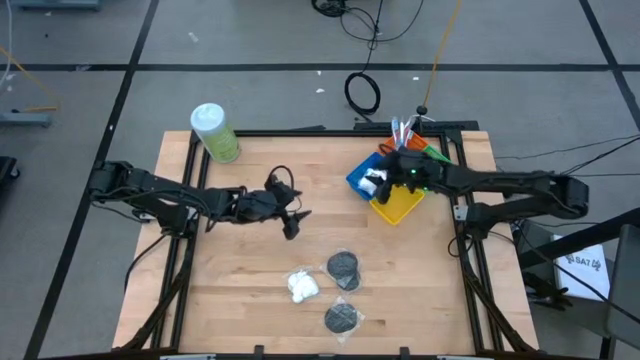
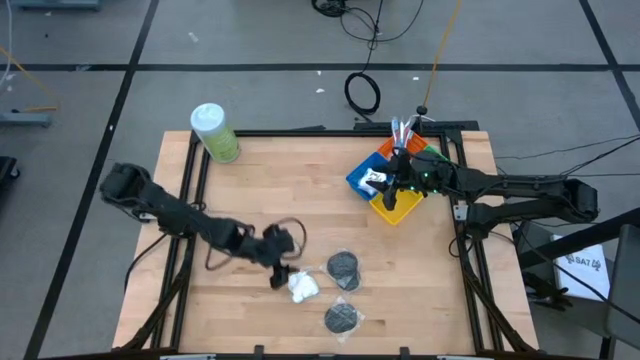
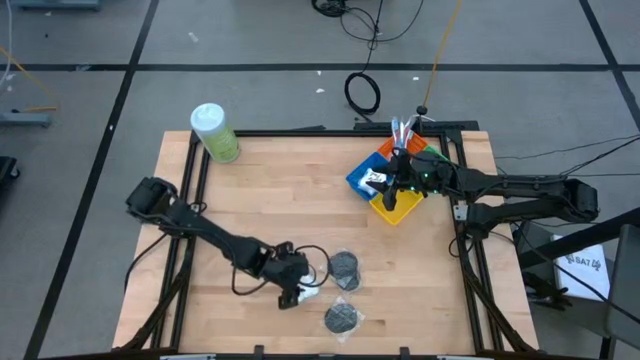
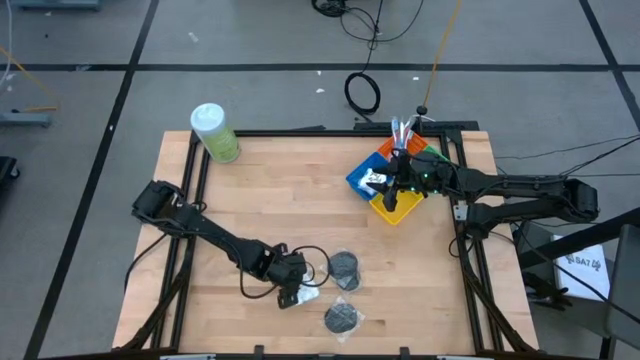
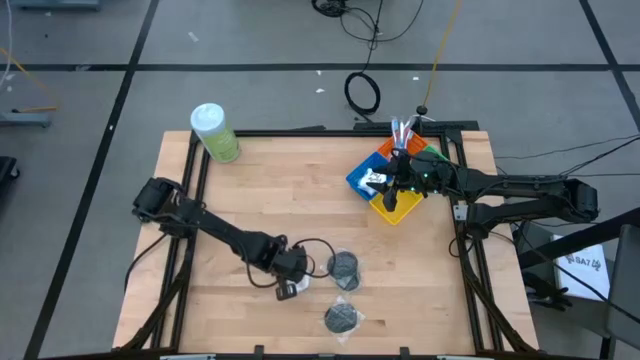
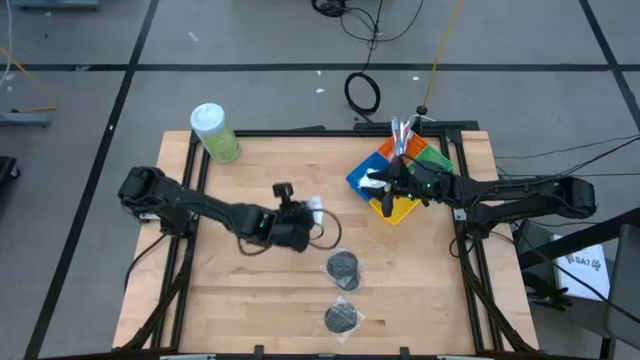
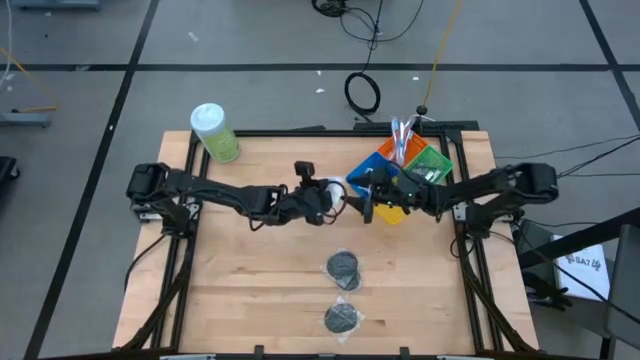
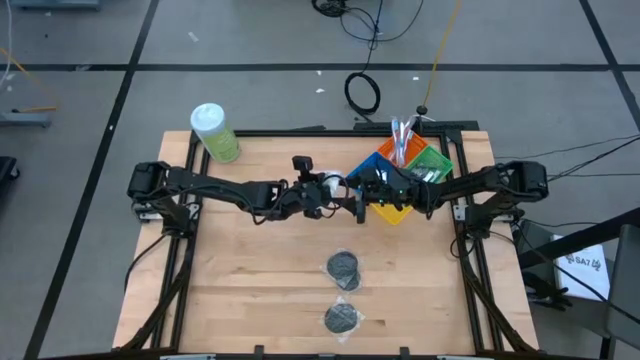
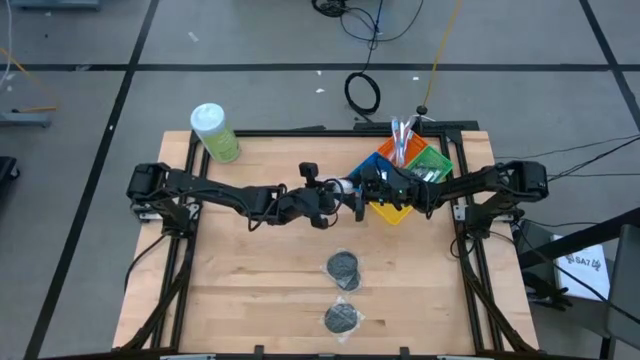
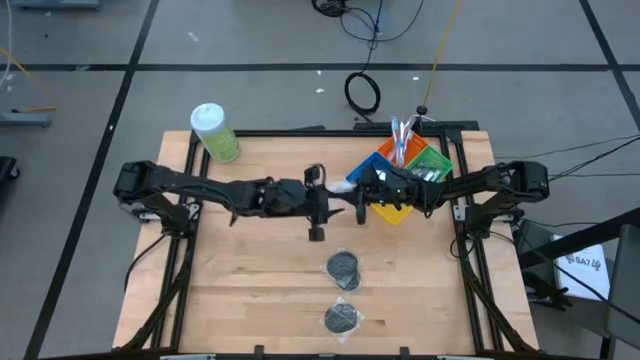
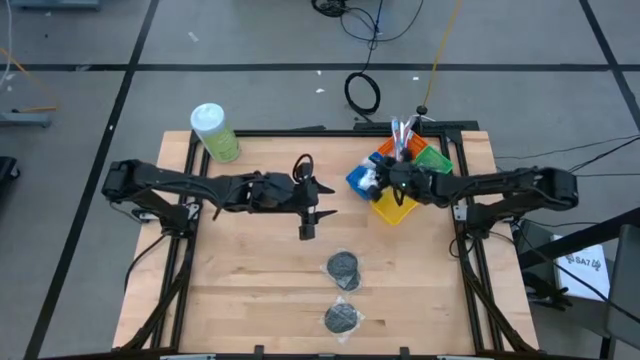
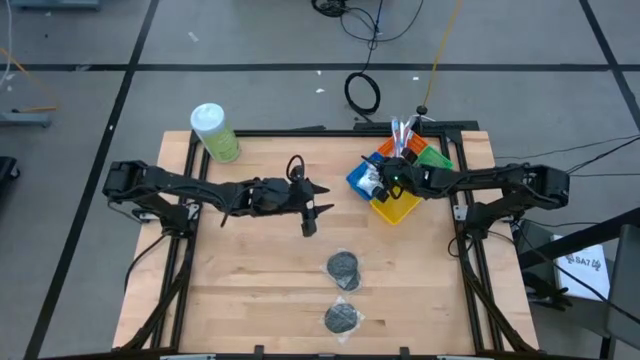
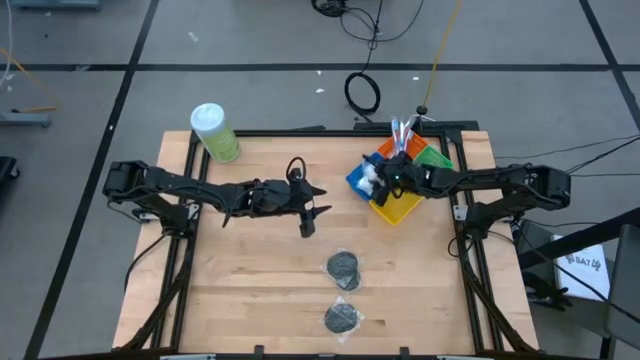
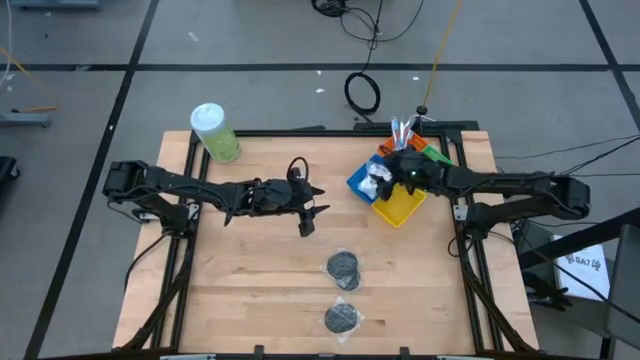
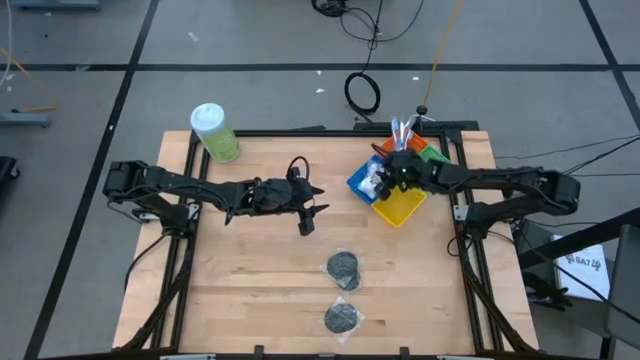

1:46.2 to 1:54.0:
Task: Pick & Place Travel size toiletries
Put the cotton pack into the blue bin

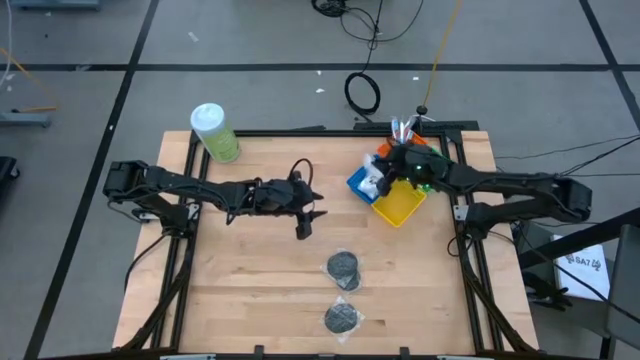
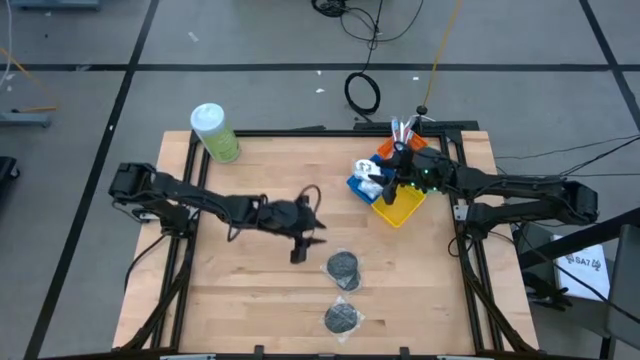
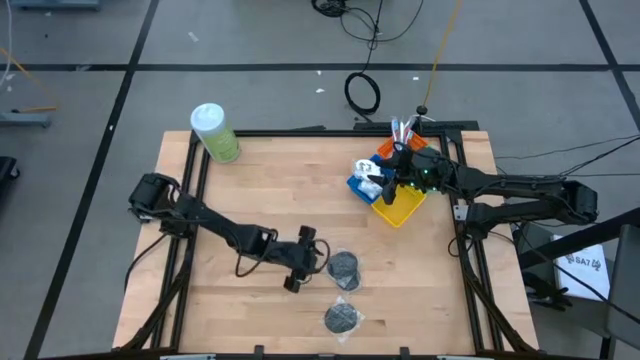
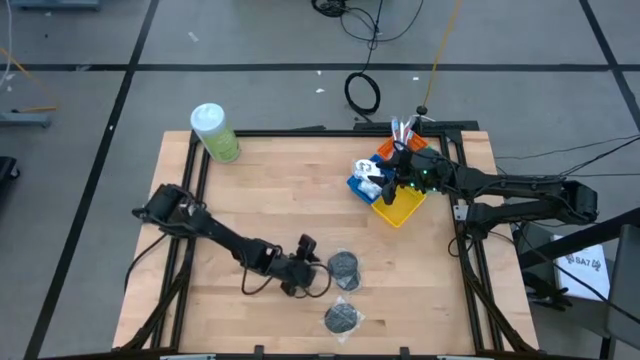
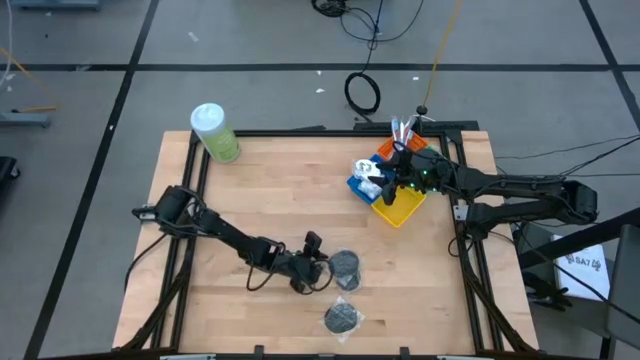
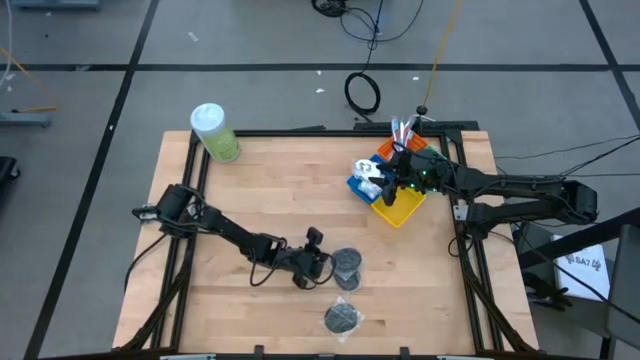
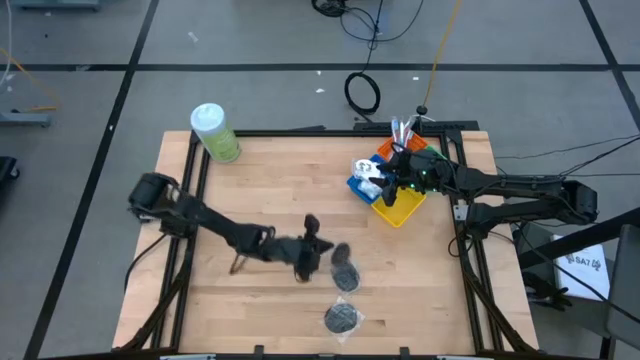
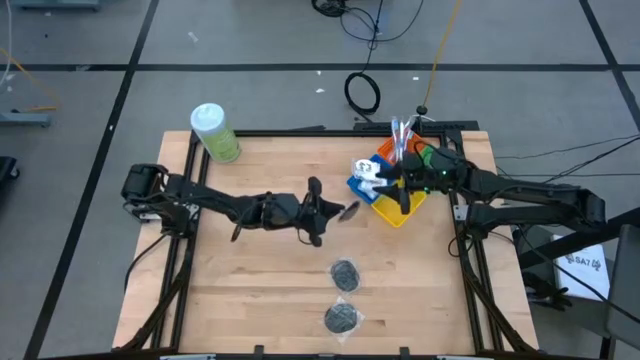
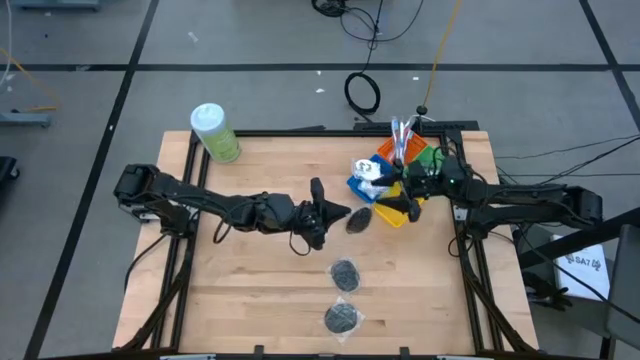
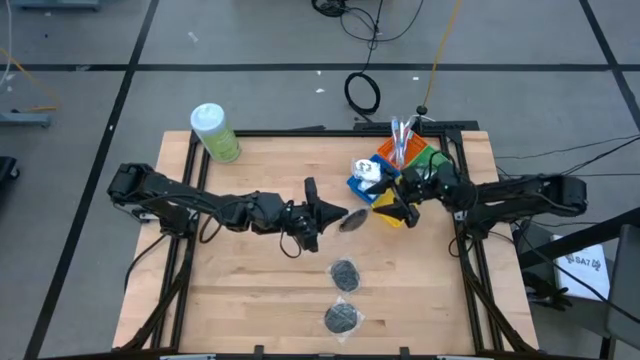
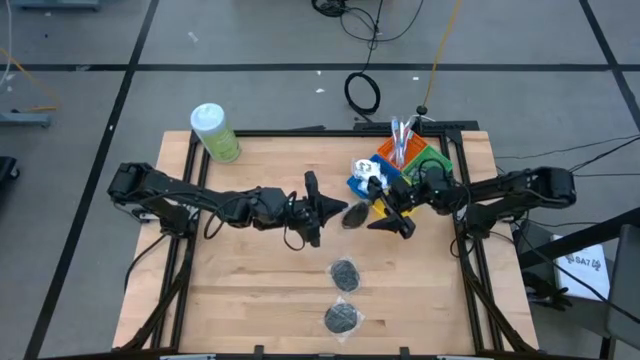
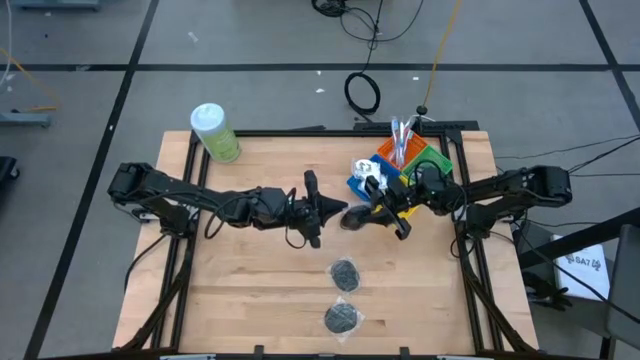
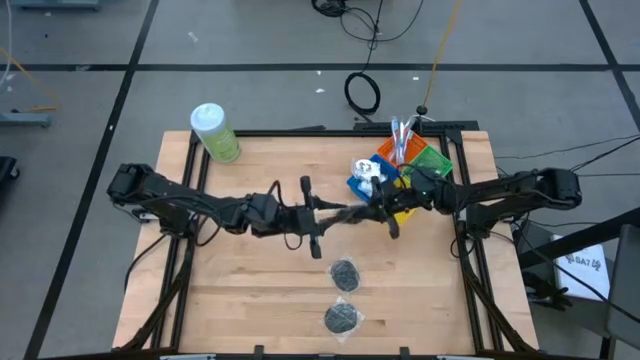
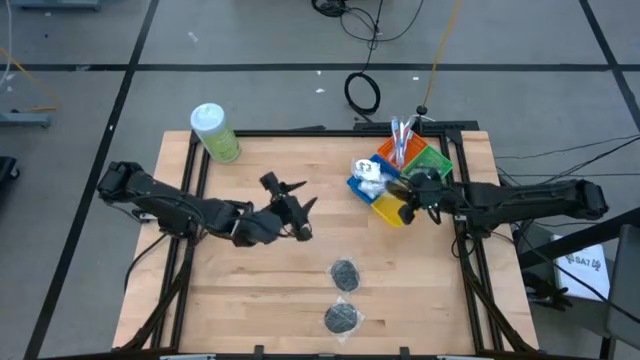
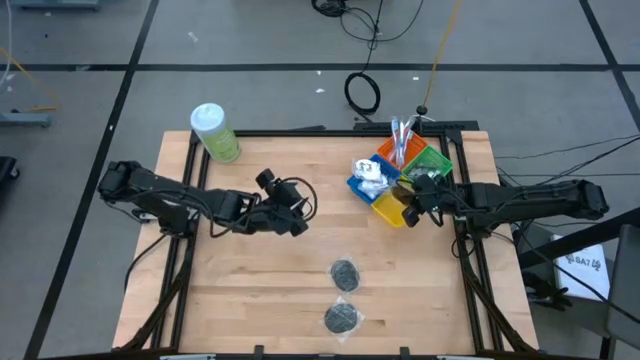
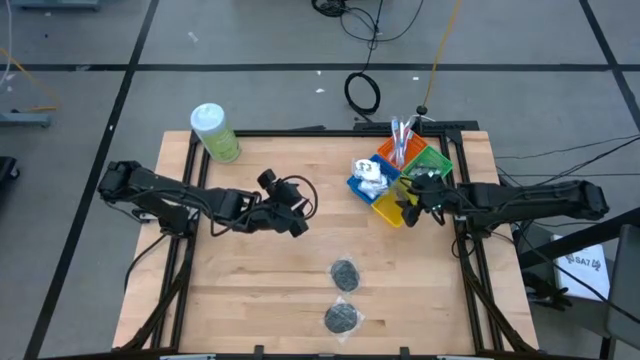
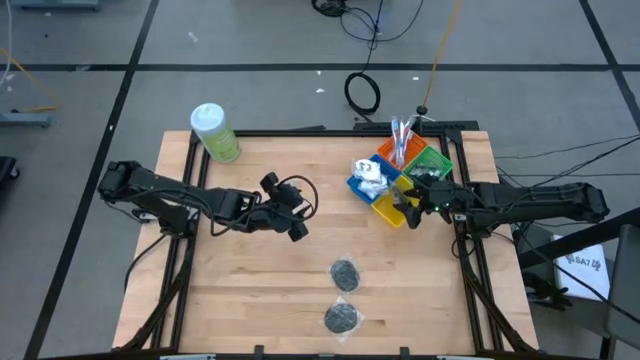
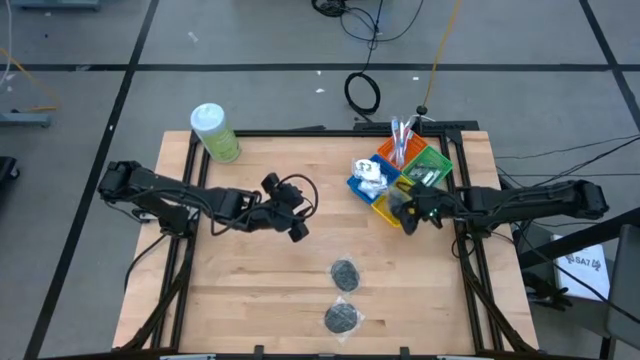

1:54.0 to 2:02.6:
Put the black hairbrush into the yellow bin

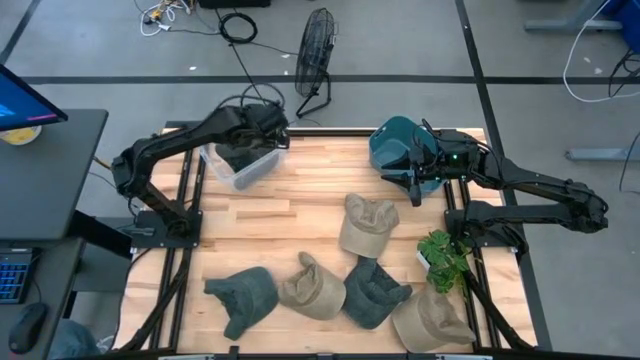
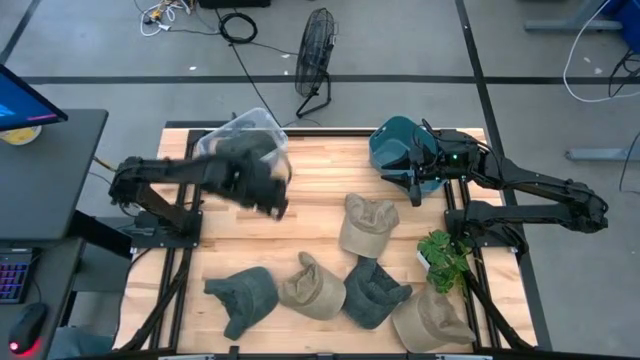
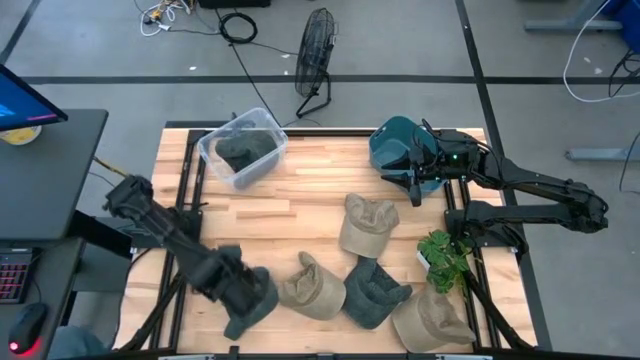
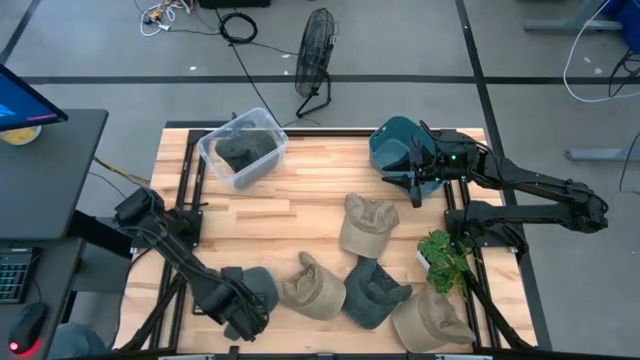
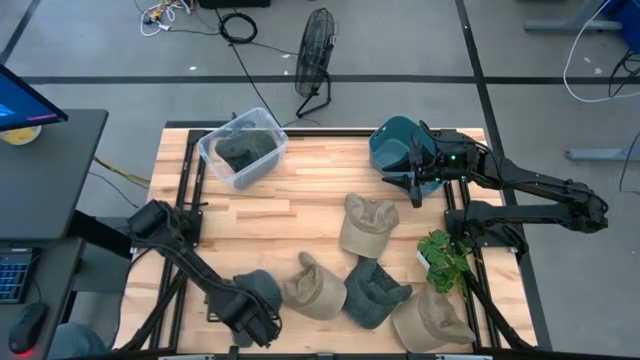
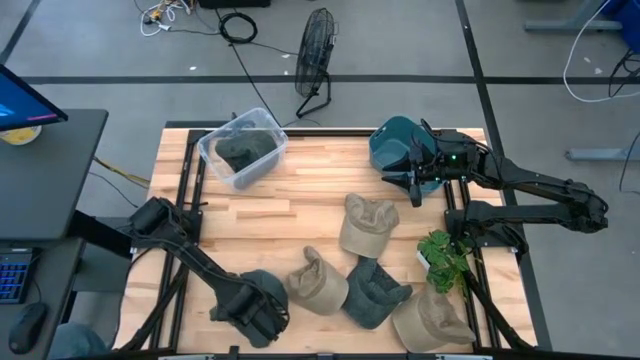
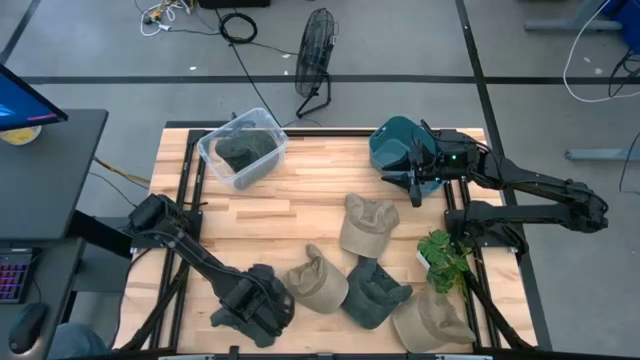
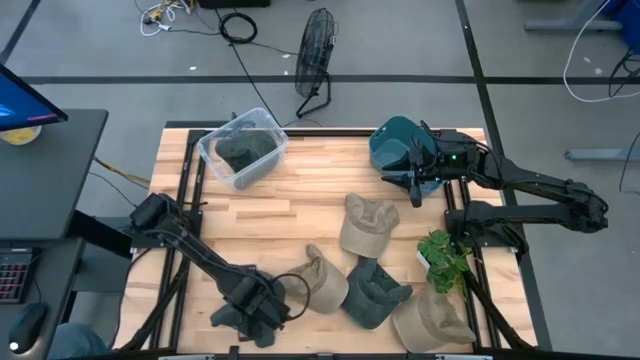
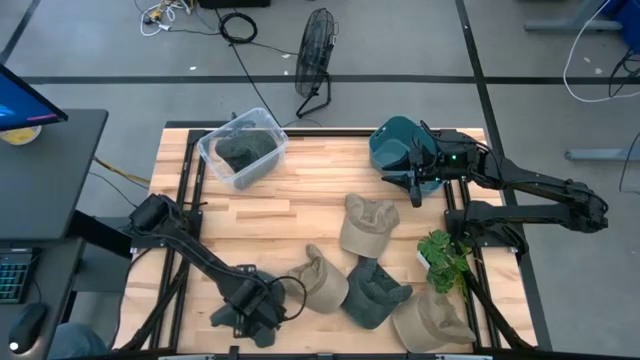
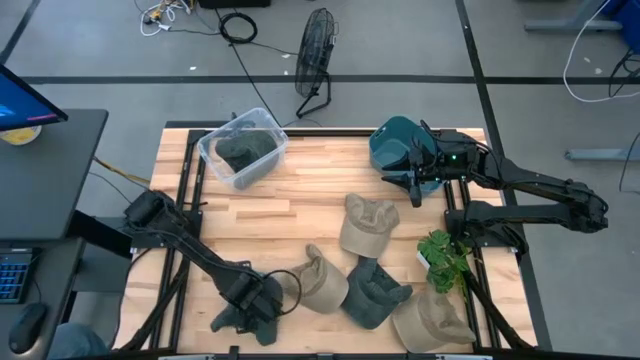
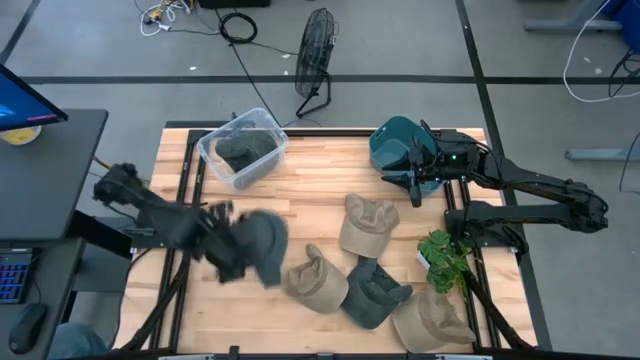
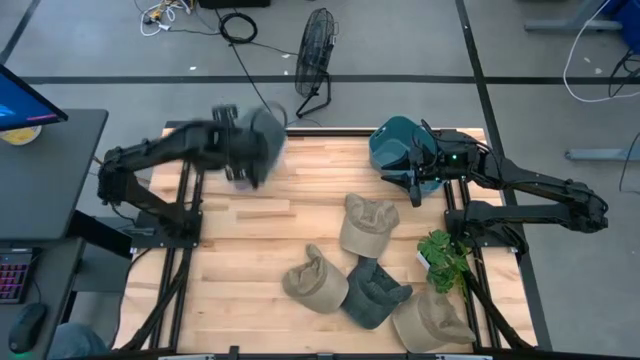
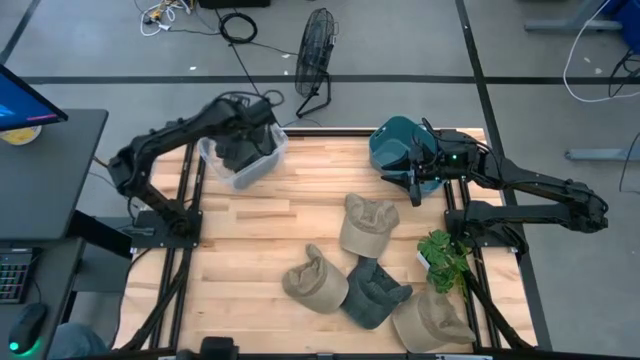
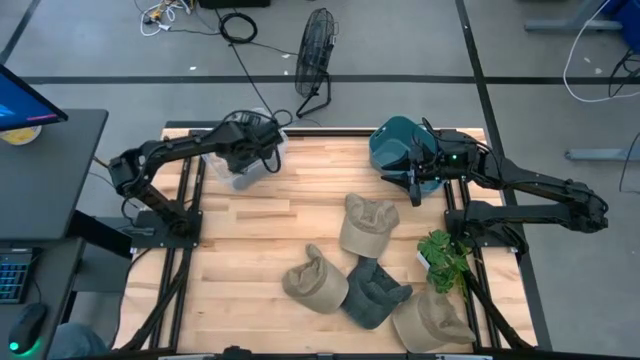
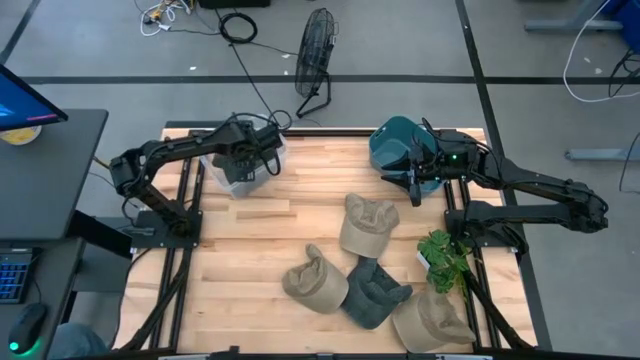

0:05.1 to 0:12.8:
Task: Pick & Place hat
Put the left gray cap into the transparent bin
